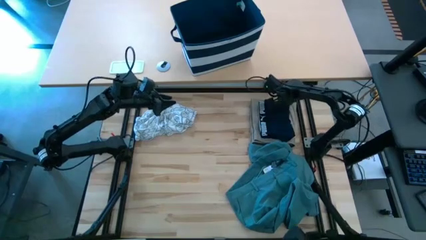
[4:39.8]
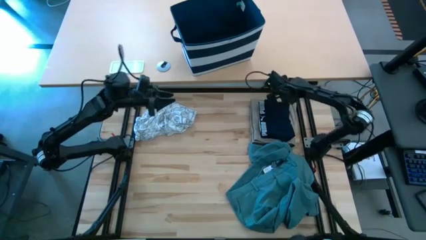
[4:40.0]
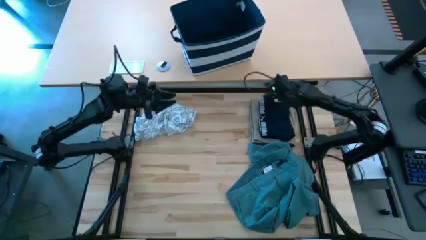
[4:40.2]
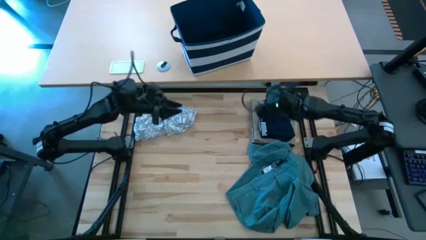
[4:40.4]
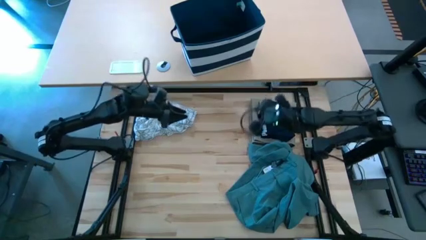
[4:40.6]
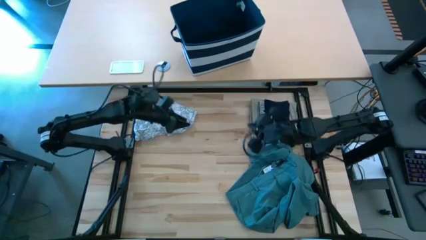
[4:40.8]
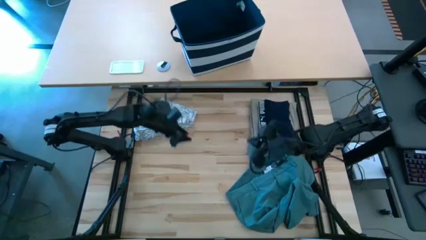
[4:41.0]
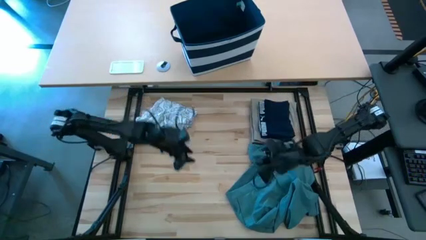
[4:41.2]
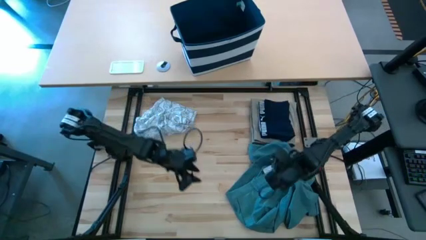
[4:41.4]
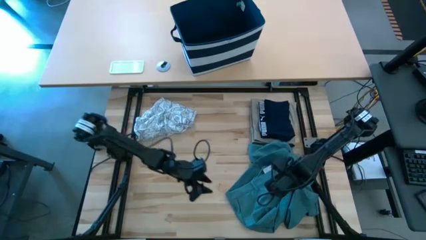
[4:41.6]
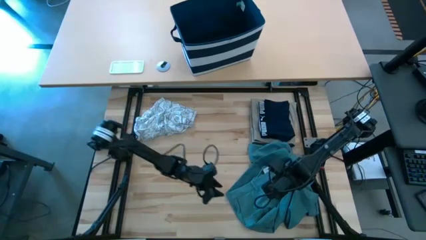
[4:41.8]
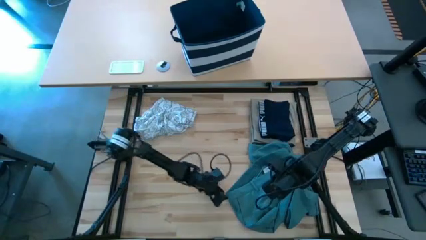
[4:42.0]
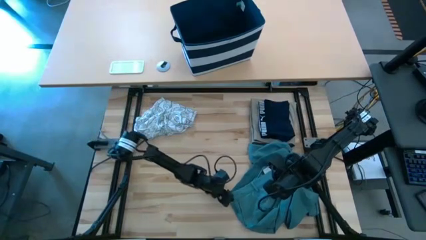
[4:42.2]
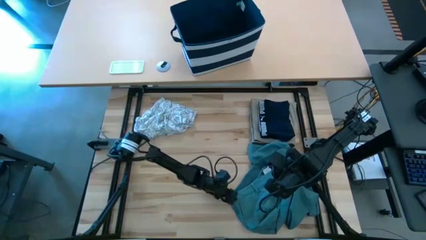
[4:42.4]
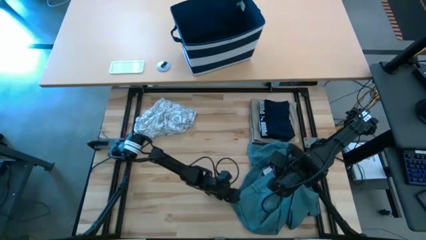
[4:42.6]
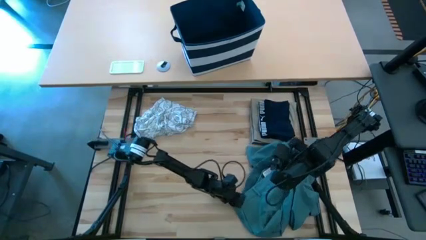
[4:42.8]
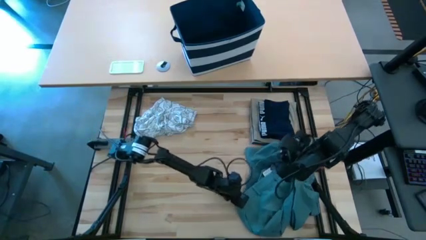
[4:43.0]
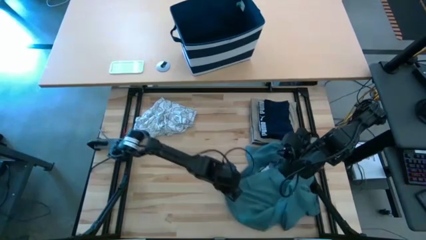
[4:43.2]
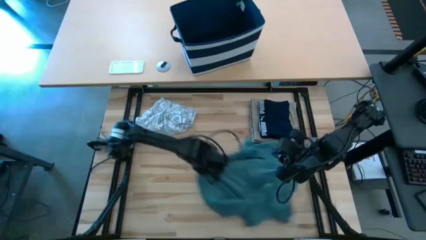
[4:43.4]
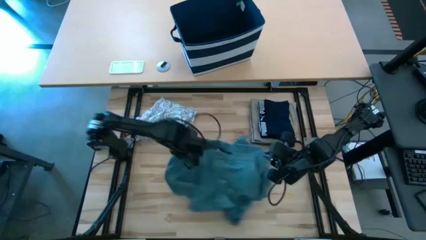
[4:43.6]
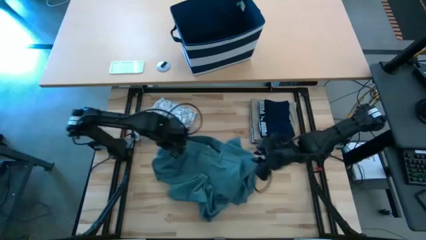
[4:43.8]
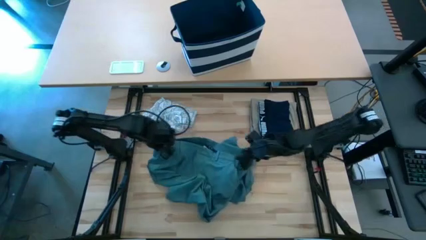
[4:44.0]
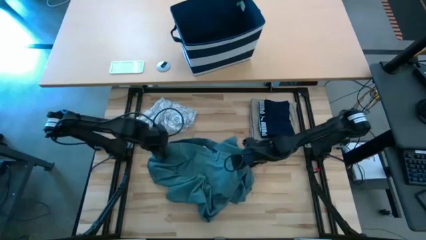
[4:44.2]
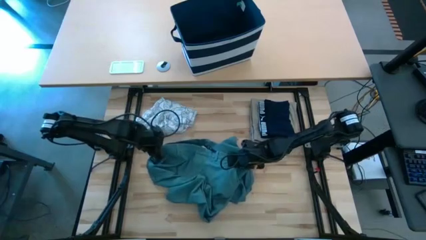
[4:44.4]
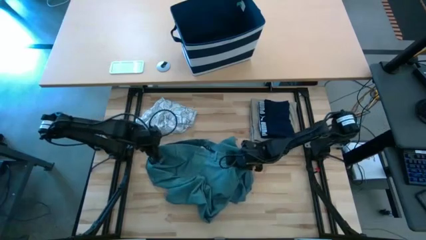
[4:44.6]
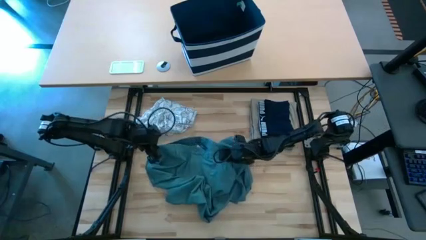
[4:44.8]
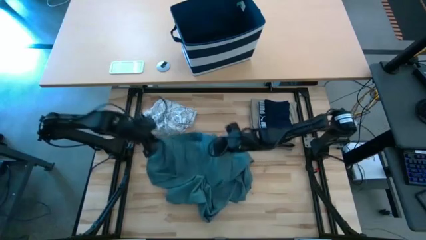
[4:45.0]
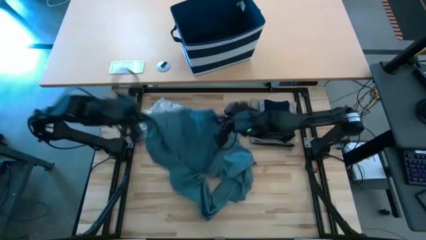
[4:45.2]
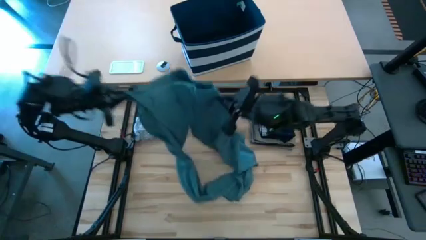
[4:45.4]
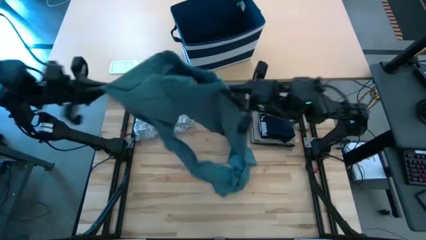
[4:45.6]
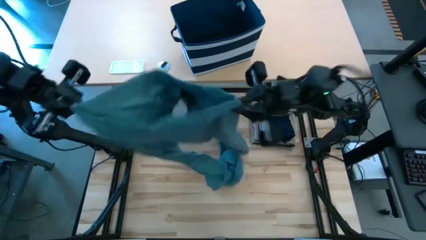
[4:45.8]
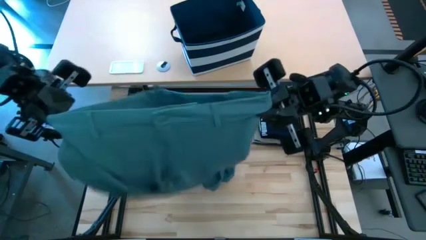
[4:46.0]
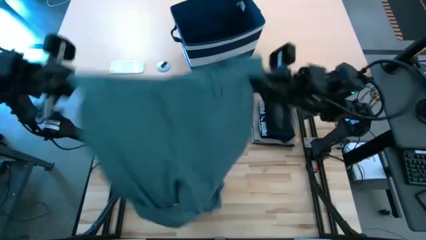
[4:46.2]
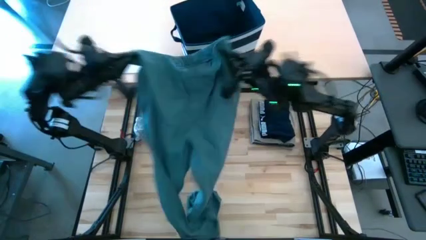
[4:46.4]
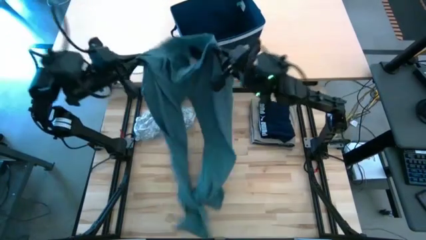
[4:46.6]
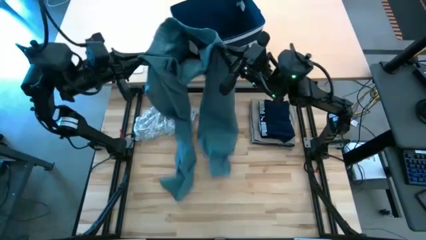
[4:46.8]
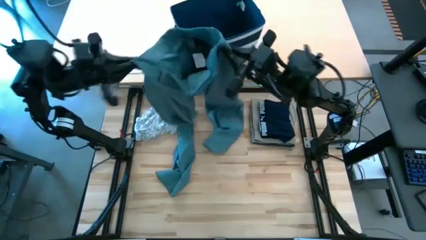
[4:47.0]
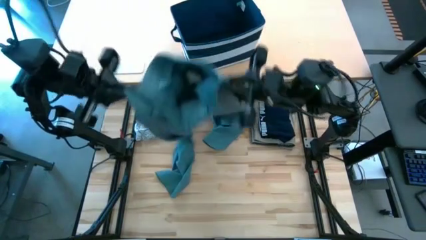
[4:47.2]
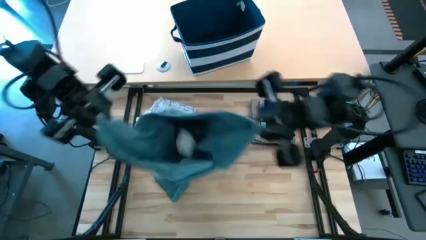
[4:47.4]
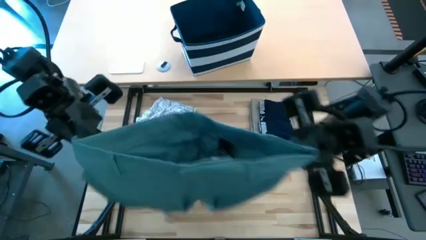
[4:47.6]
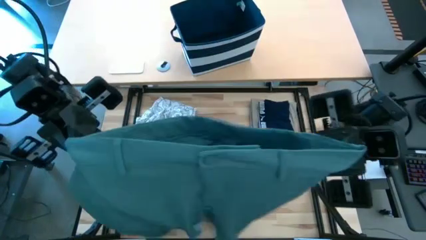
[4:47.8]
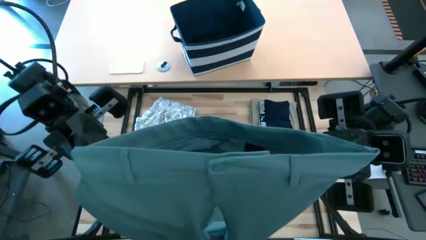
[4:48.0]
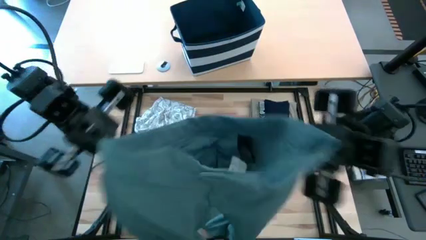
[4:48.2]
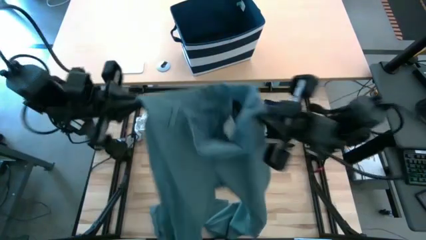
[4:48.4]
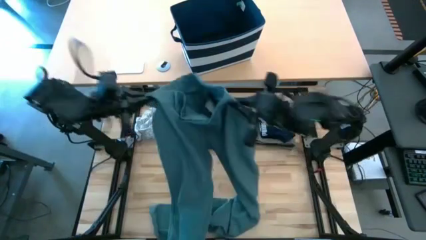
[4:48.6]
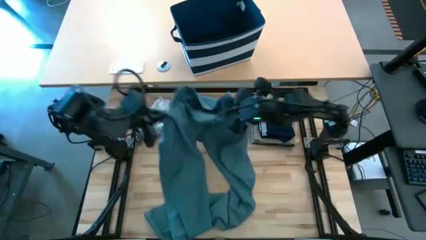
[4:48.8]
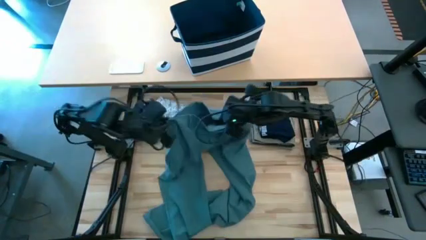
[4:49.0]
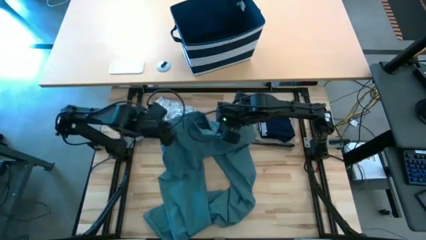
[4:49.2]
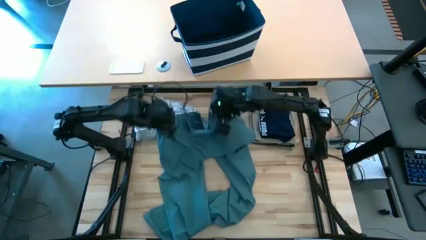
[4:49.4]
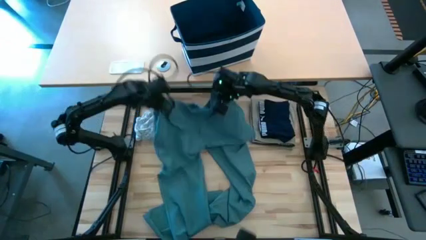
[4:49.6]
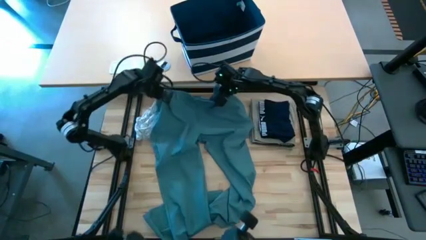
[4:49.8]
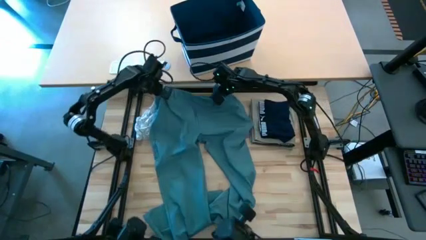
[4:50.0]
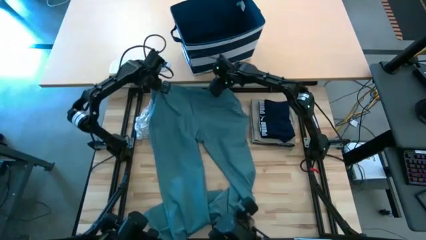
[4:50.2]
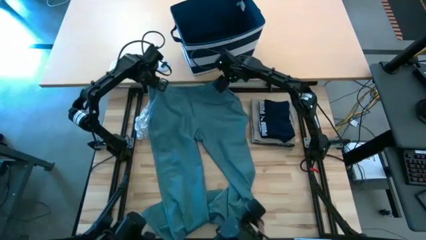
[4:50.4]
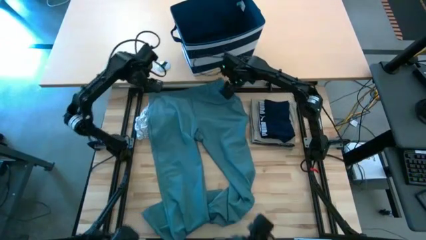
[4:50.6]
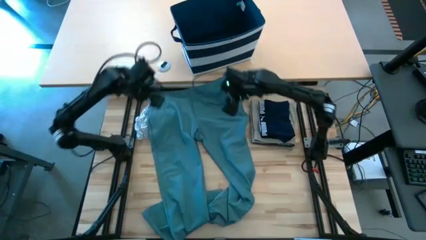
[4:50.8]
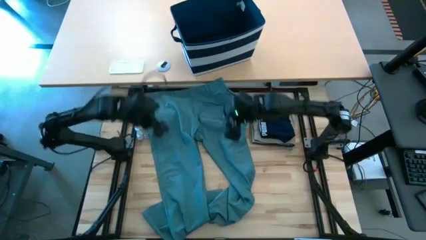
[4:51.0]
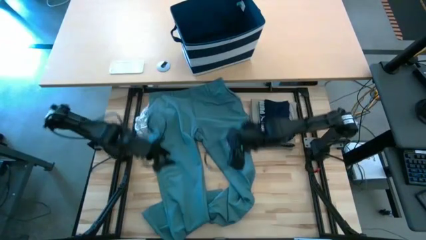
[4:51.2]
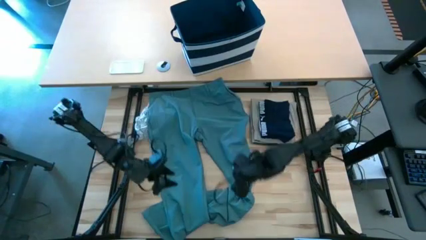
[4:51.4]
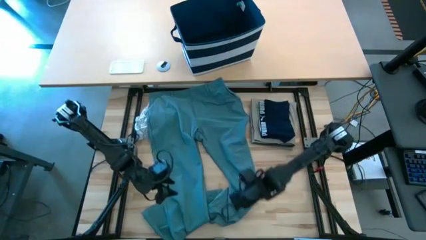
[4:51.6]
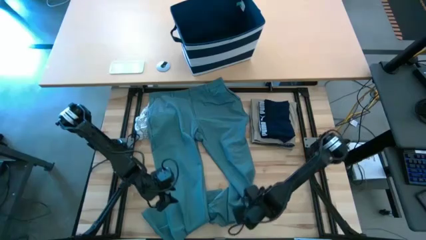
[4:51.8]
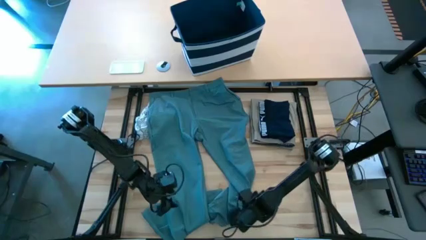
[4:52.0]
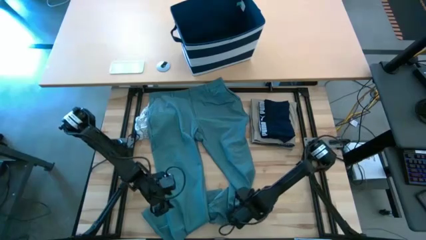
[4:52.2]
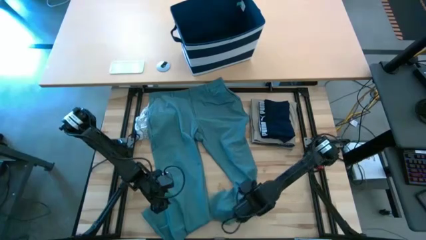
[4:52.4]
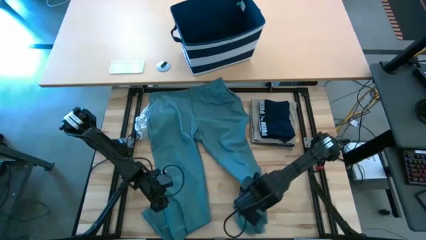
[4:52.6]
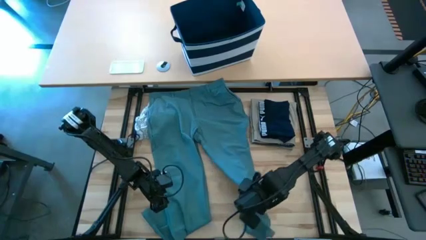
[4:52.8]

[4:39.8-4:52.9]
Task: Fold Laundry from Bin
Fold the blue pants

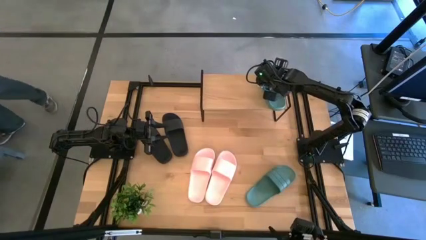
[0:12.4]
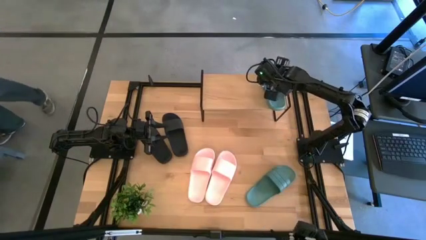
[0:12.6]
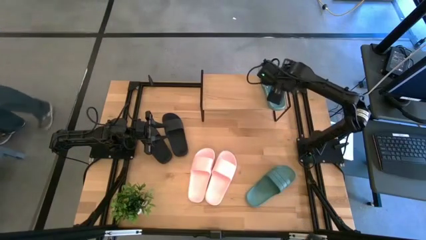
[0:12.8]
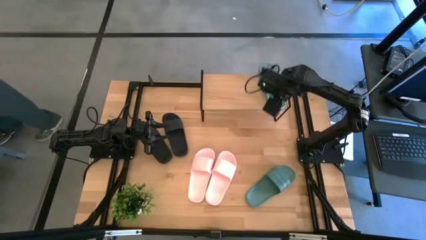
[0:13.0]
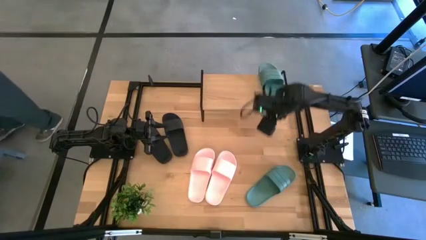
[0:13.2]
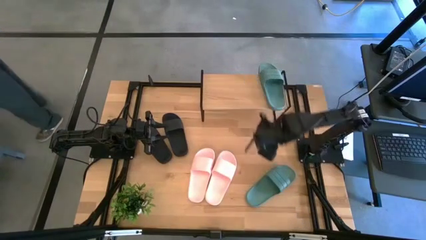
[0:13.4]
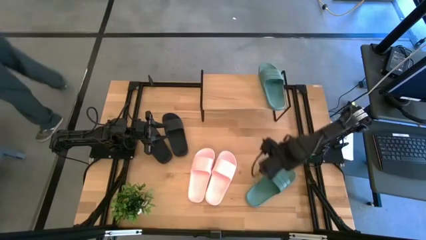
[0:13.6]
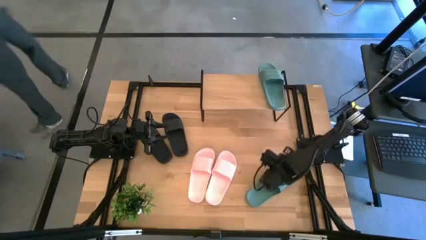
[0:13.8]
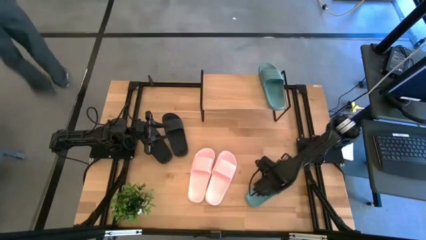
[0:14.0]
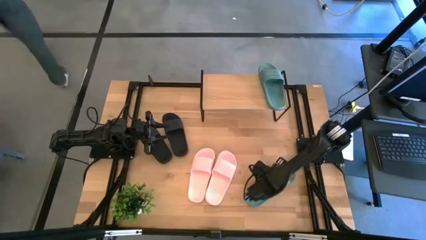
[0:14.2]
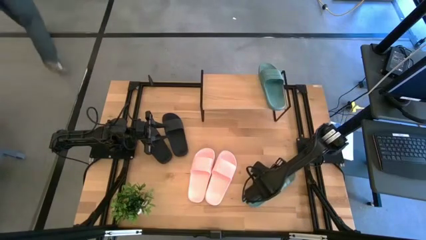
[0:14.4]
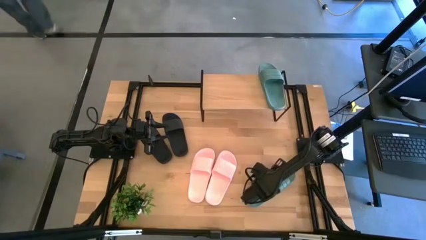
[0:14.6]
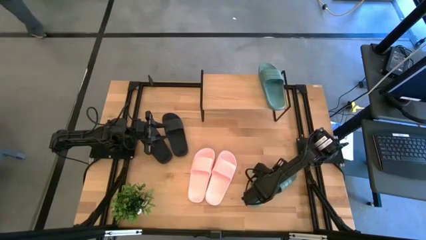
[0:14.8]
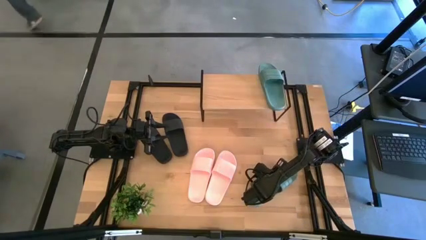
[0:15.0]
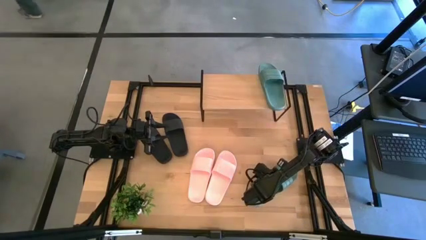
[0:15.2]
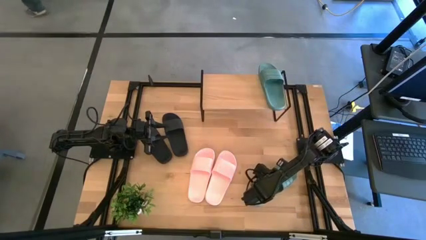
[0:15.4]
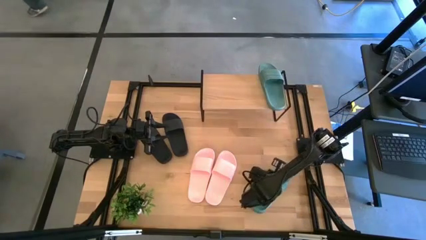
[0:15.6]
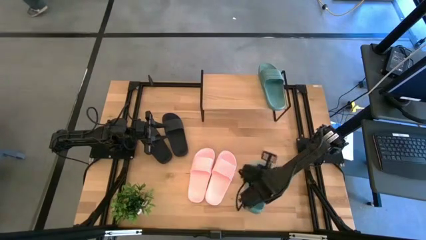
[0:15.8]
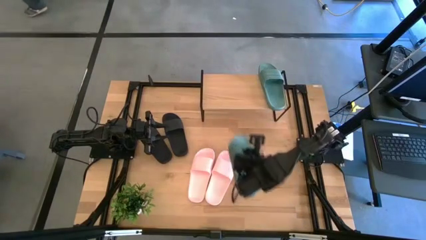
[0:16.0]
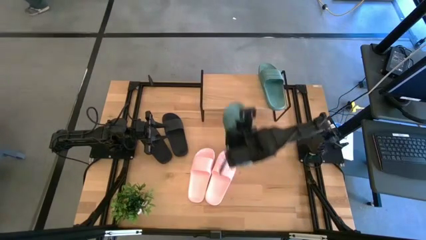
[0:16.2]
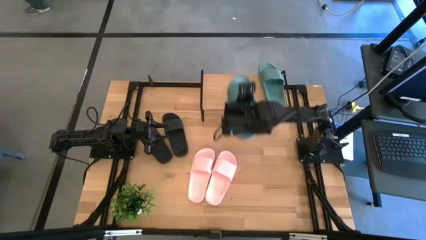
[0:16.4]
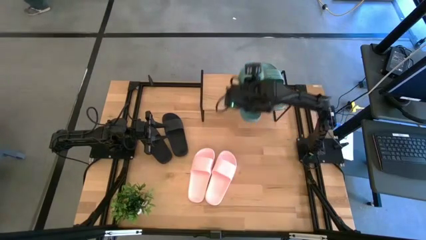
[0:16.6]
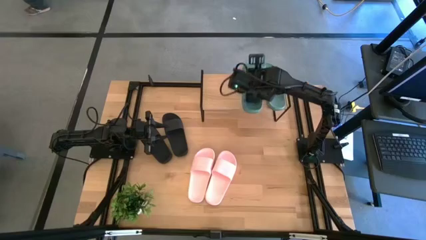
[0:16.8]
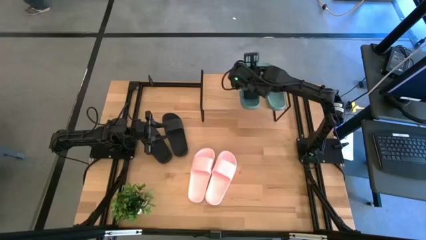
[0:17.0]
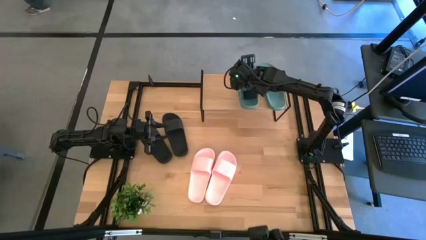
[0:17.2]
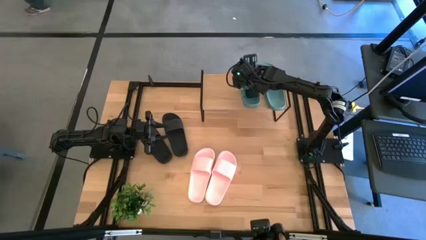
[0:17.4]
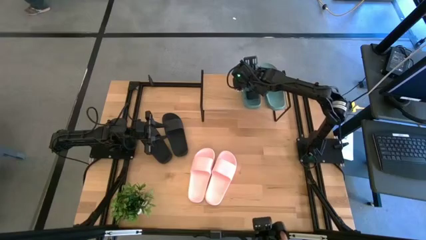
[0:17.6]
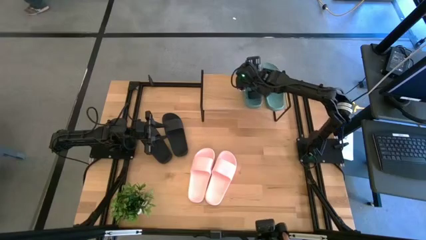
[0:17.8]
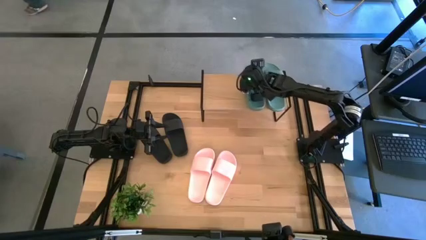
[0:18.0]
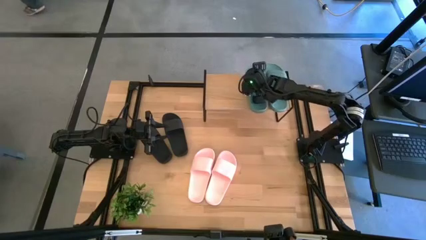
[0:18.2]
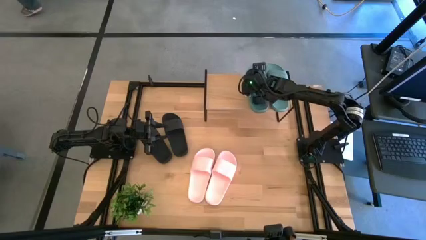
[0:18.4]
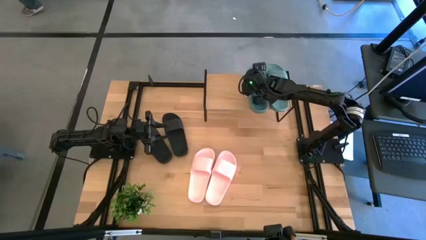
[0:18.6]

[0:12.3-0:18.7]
Task: Pick and place slides into the shelf
Put the green slide on the shelf
